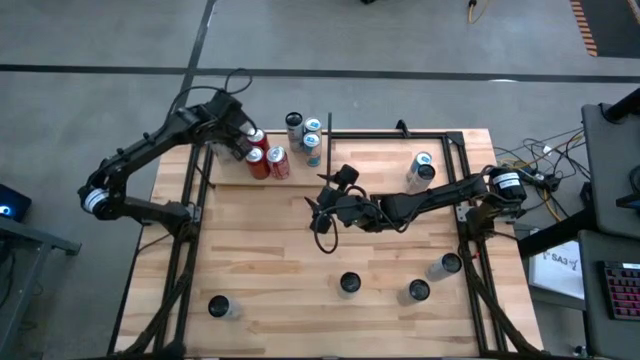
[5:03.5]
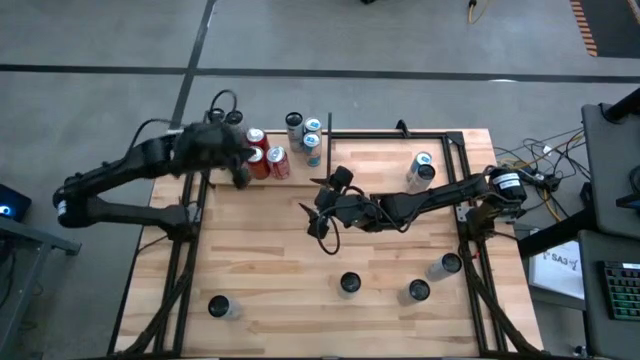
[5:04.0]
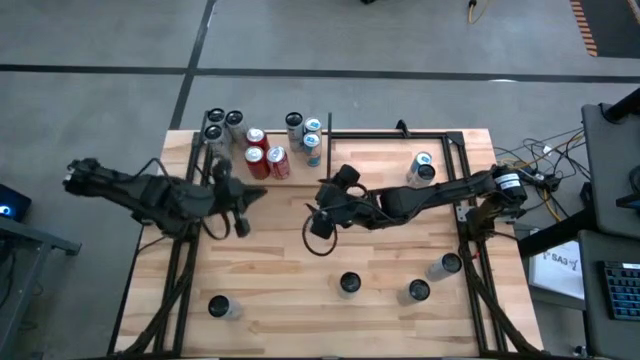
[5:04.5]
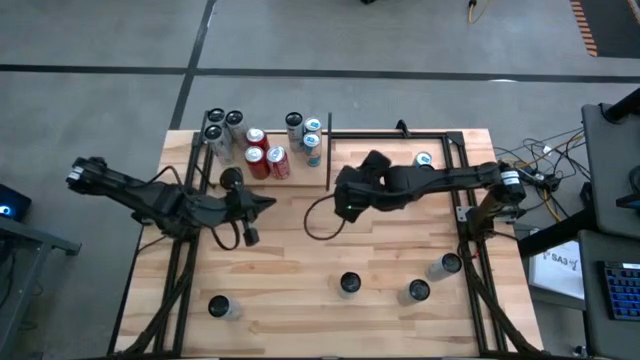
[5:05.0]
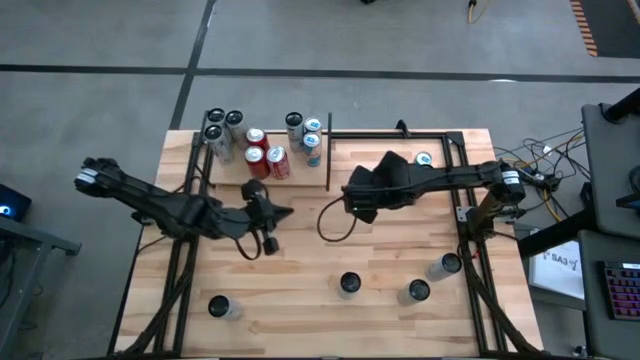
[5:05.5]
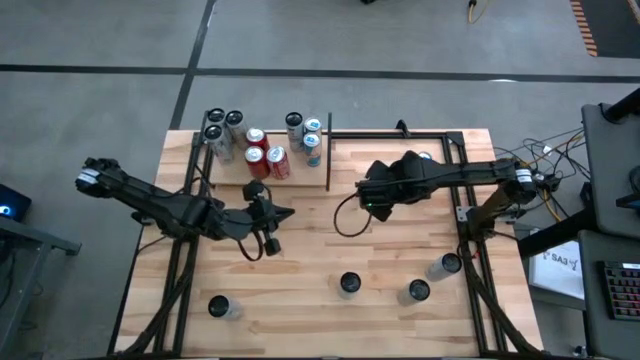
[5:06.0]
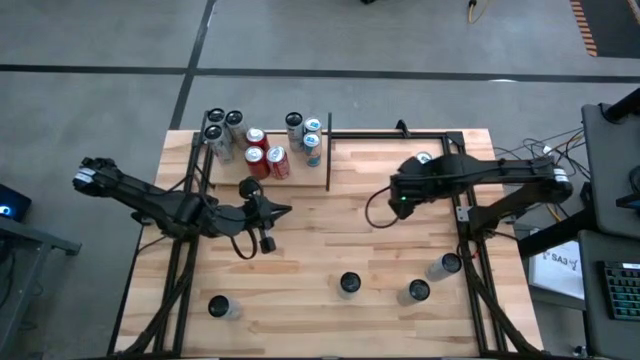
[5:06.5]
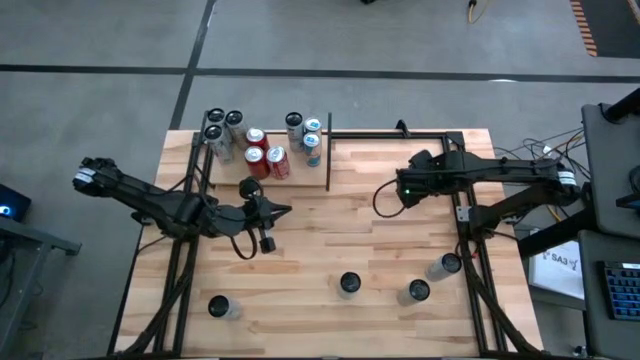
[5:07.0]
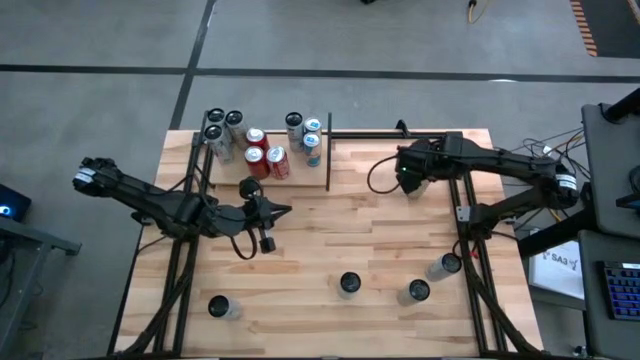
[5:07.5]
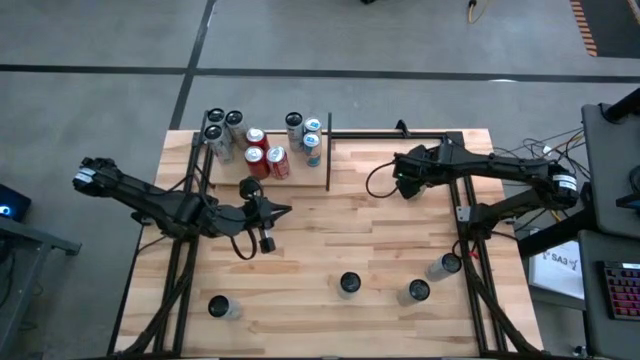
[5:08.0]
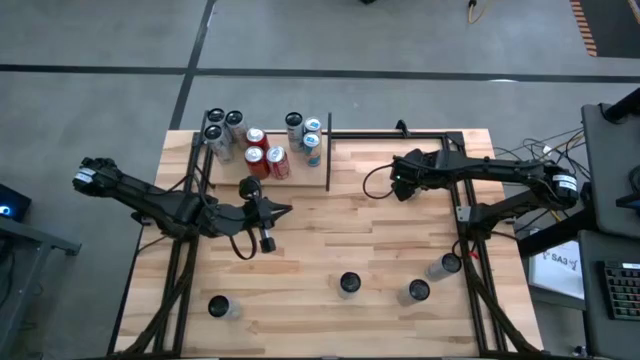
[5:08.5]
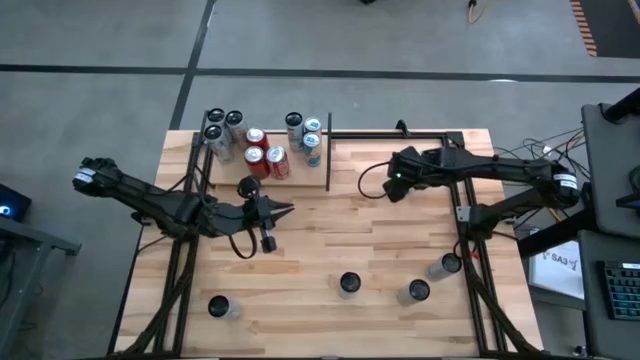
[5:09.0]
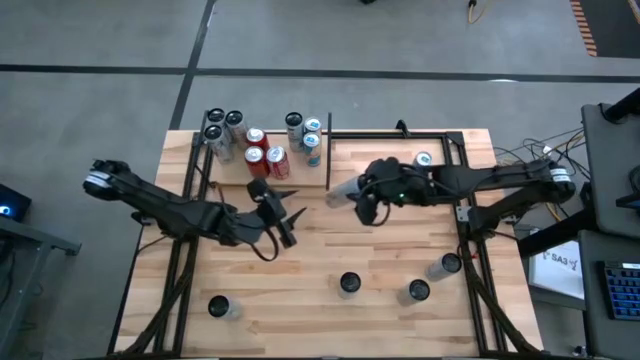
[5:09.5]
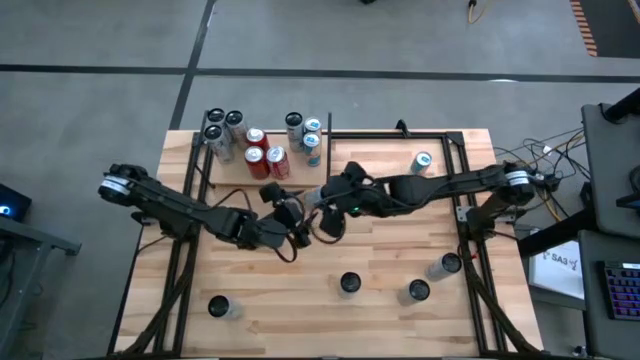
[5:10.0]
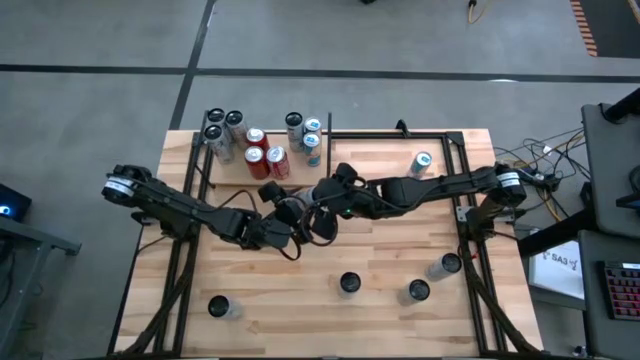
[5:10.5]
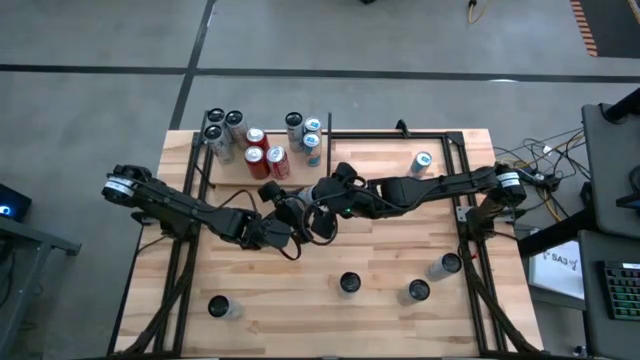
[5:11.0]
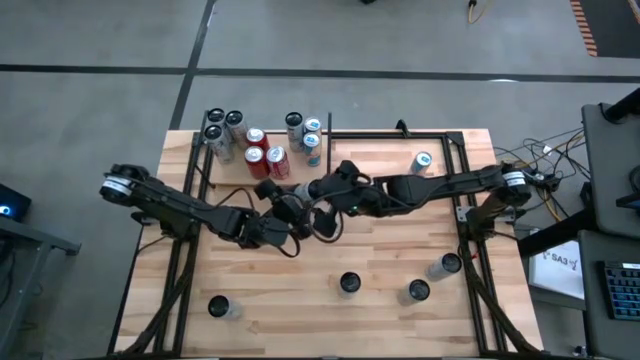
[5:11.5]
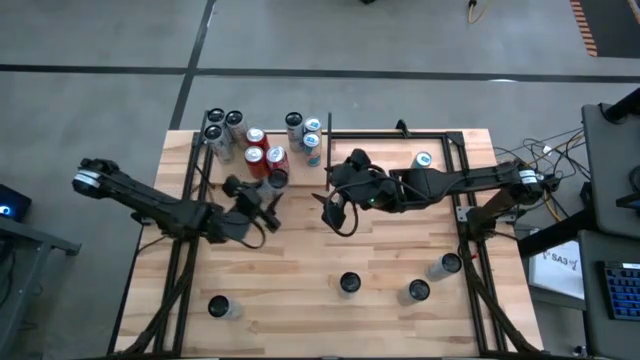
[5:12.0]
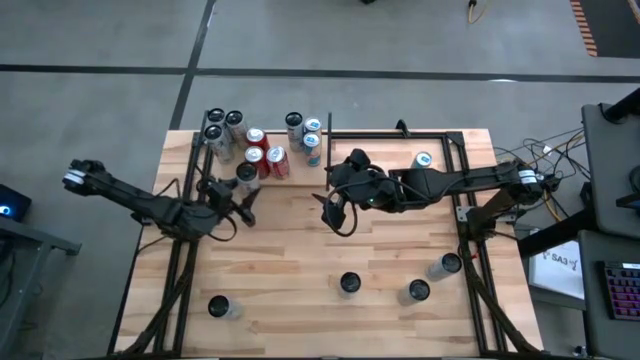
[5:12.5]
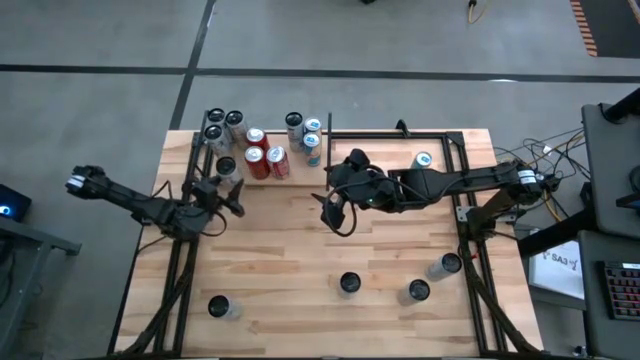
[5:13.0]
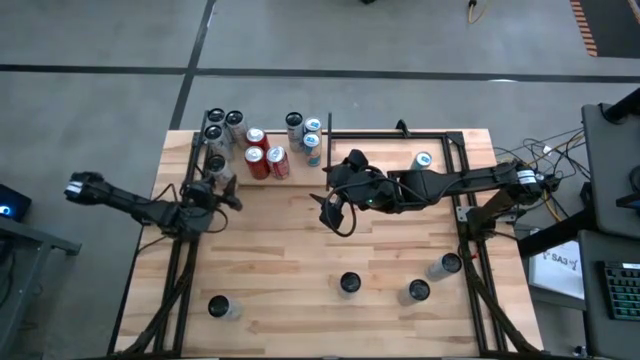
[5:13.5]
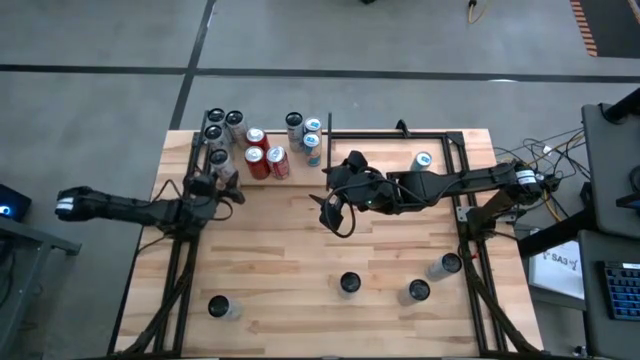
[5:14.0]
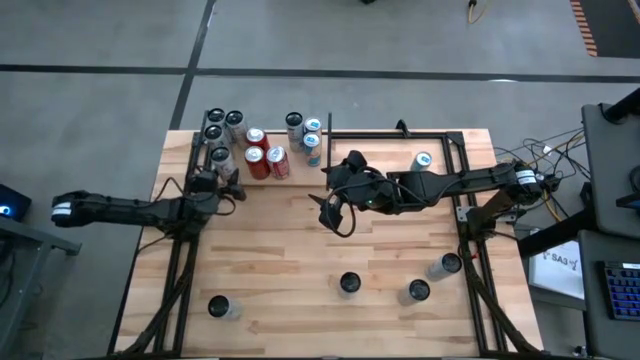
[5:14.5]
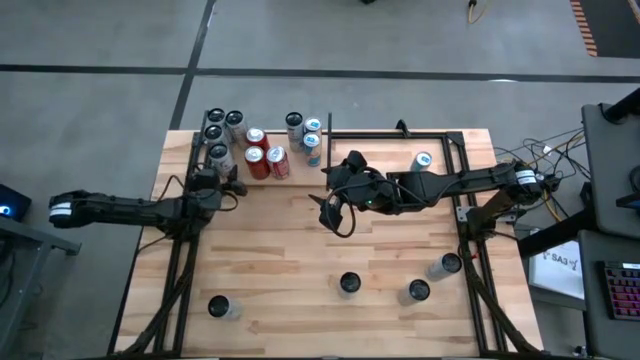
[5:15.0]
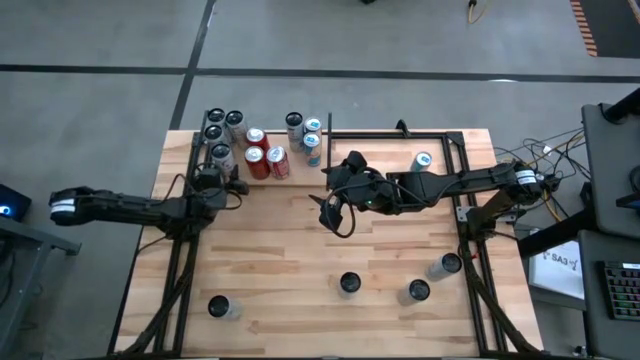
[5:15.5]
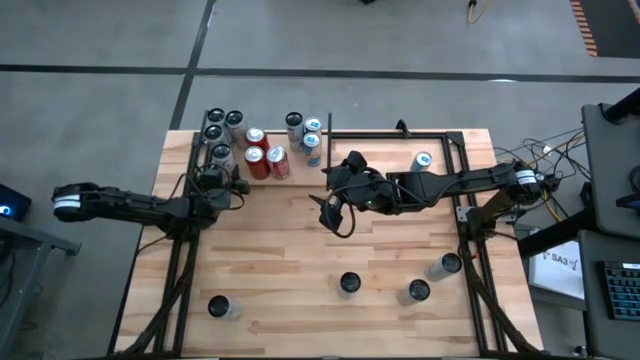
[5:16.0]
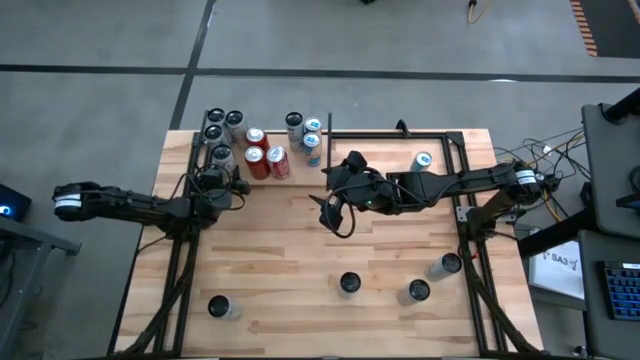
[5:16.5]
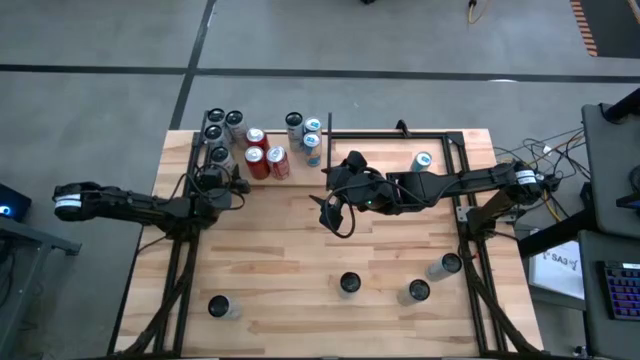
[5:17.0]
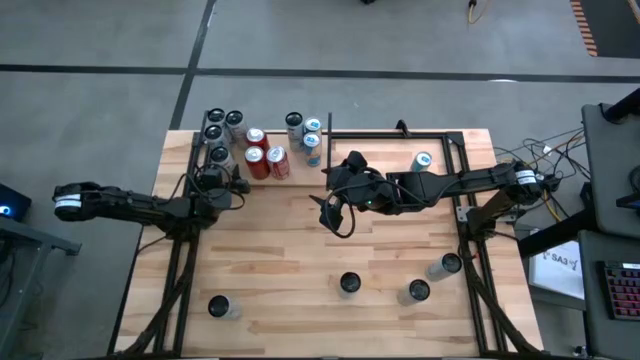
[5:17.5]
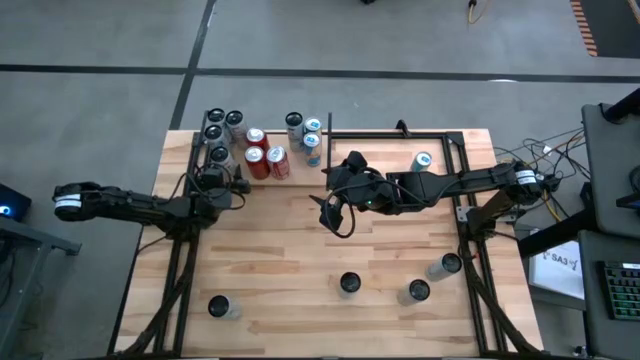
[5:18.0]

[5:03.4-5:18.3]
Task: Place canned beverage on shelf
Put the top white and yellow soda can on the shelf aligned with the other white and yellow soda can

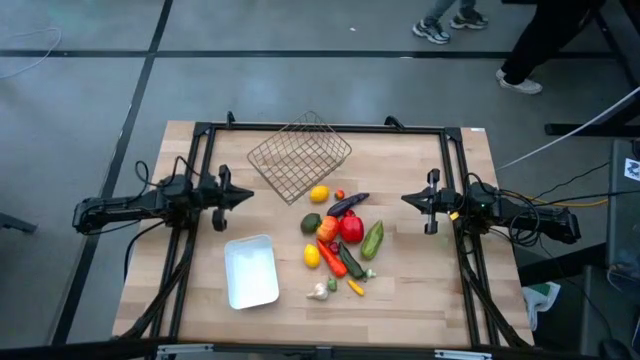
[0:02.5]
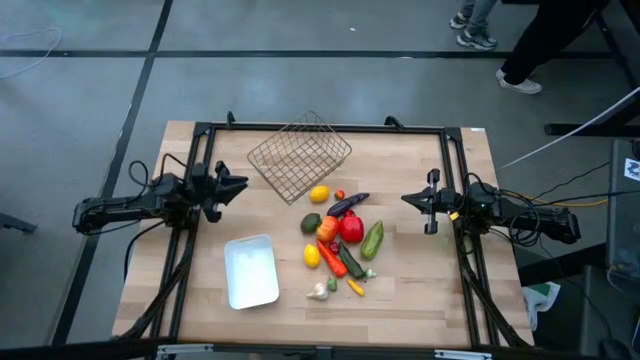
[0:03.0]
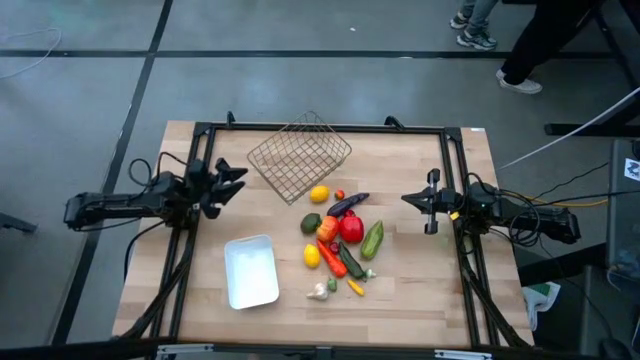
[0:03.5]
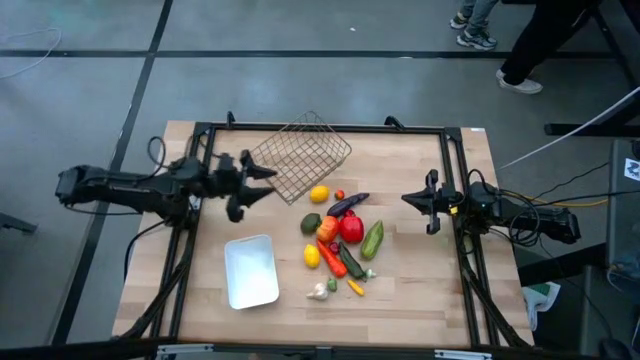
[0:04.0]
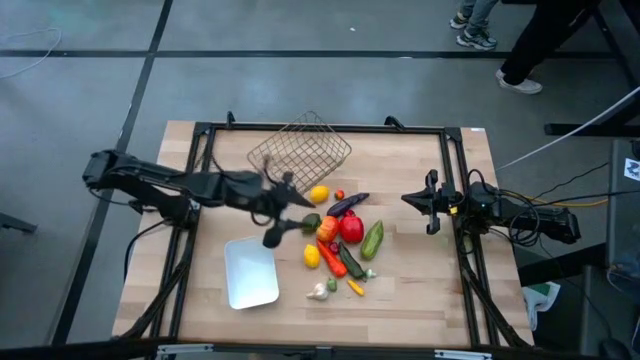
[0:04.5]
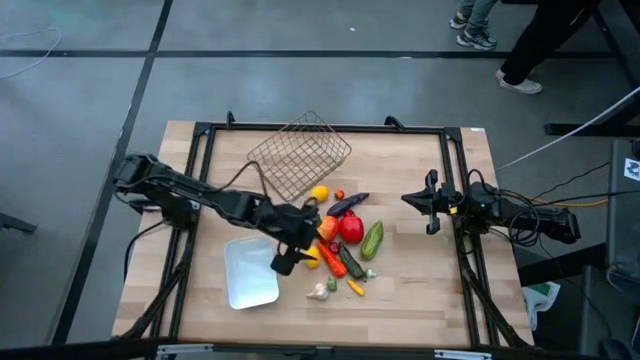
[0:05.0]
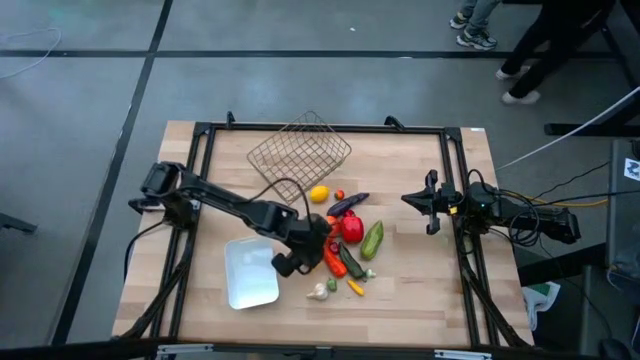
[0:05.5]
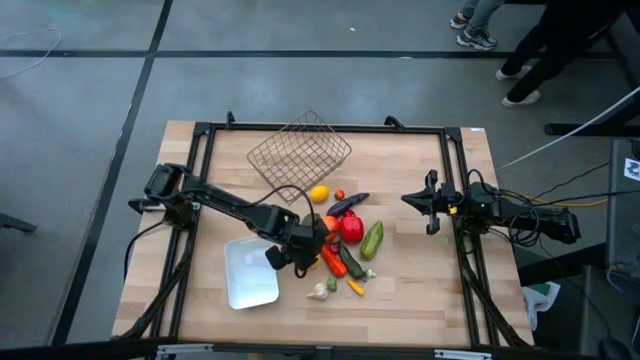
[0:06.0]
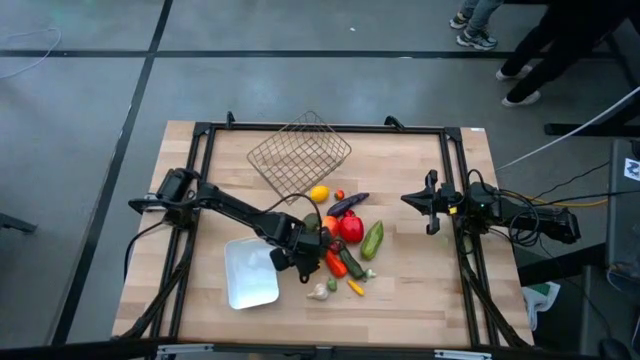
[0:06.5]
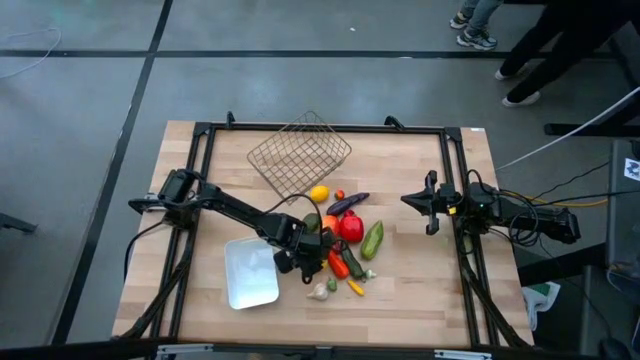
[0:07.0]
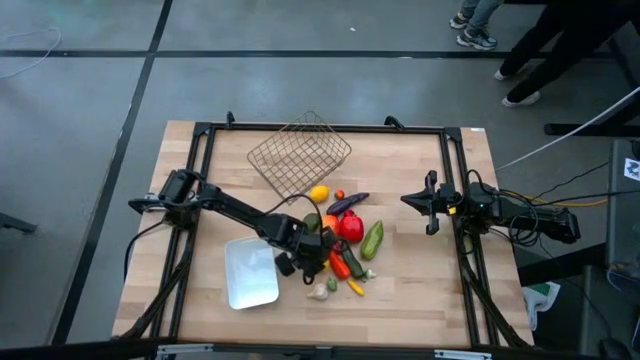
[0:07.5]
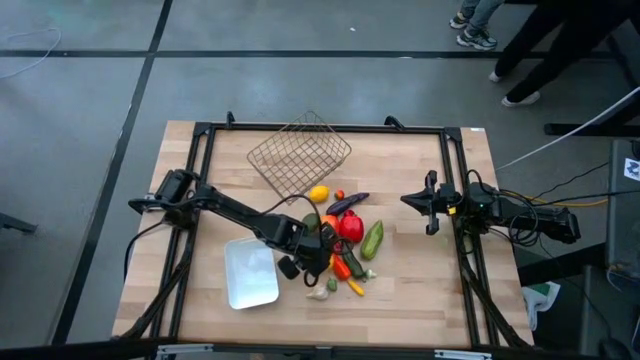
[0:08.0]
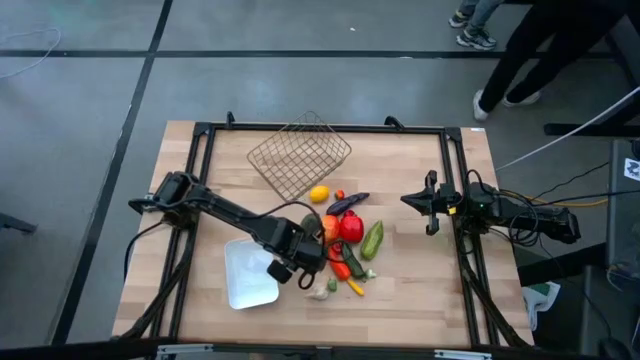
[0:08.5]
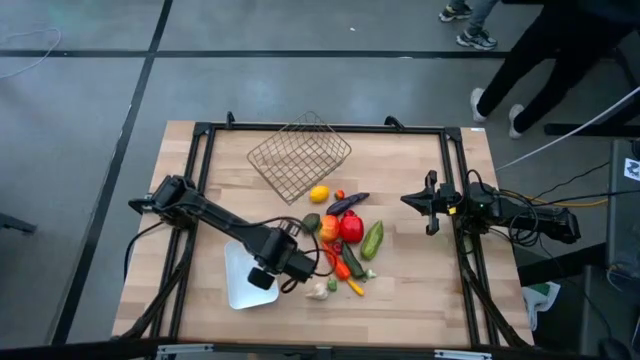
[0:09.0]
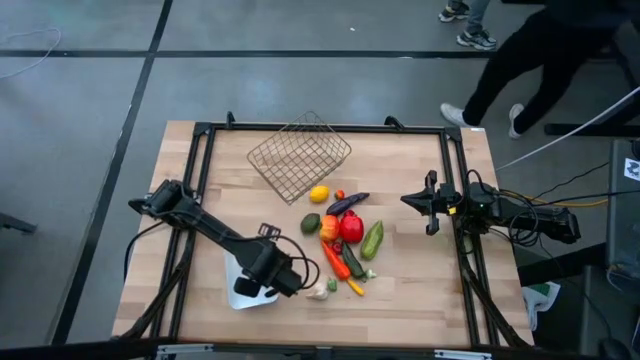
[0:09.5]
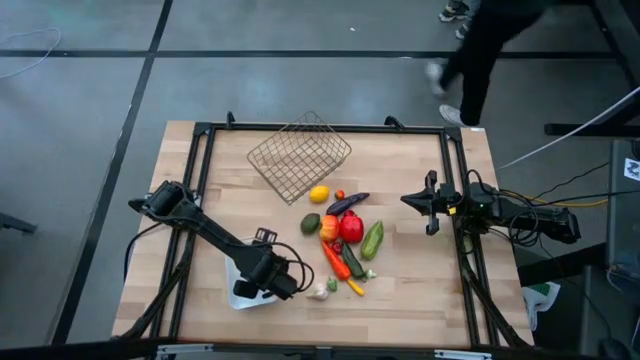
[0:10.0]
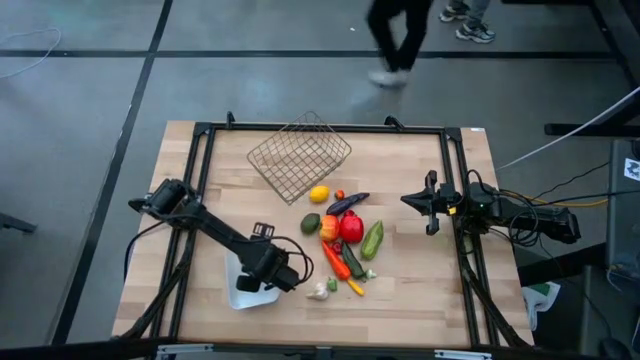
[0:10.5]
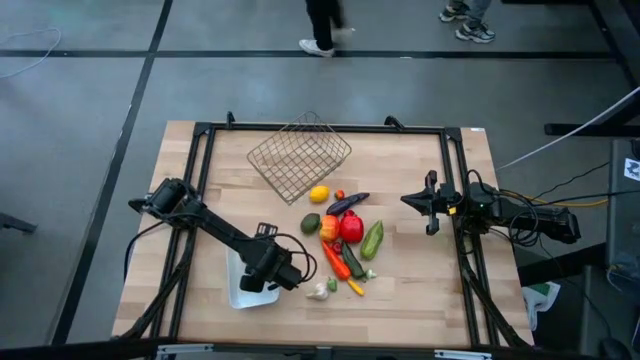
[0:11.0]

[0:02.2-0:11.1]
Task: Sort produce into baskets
Put the bottom yellow lemon into the white bin
